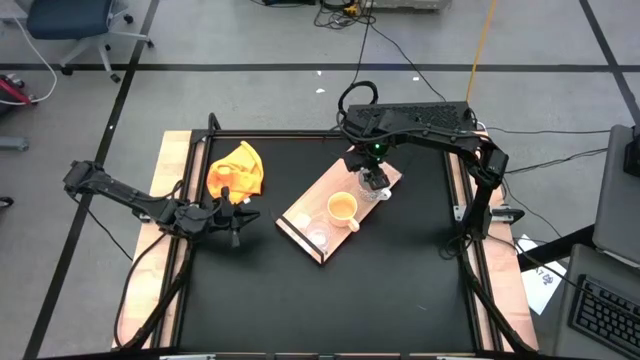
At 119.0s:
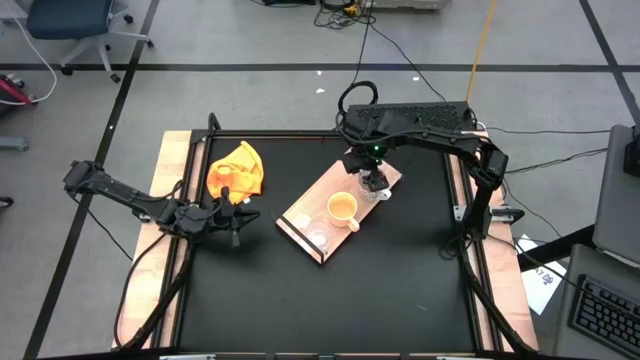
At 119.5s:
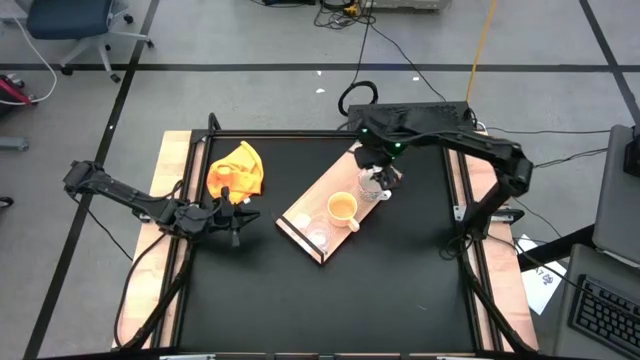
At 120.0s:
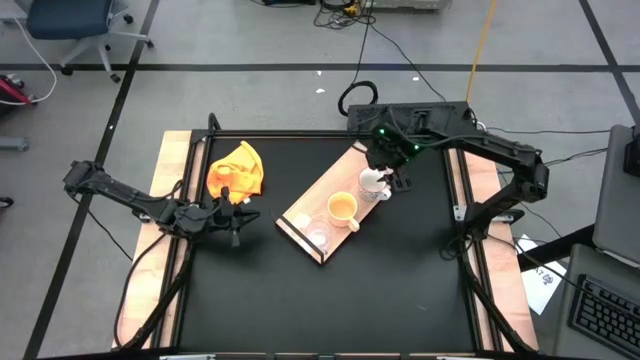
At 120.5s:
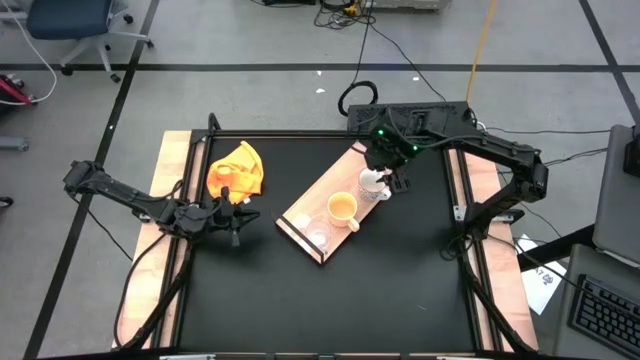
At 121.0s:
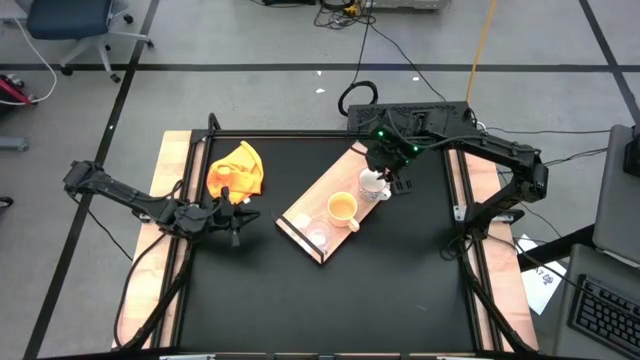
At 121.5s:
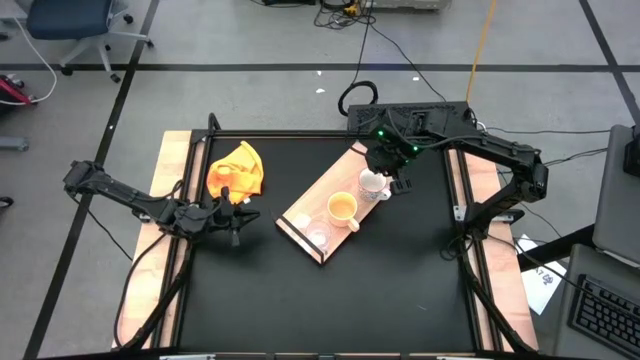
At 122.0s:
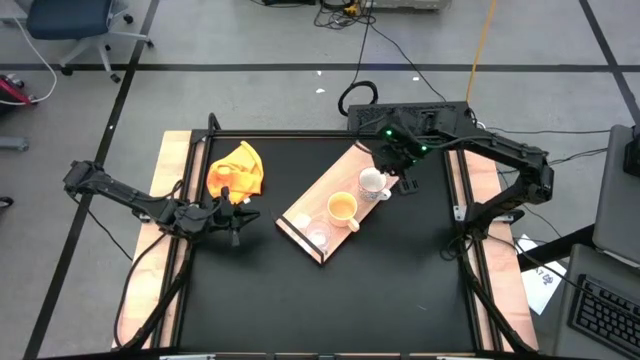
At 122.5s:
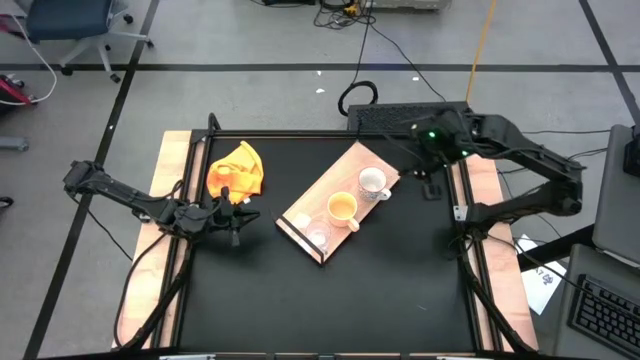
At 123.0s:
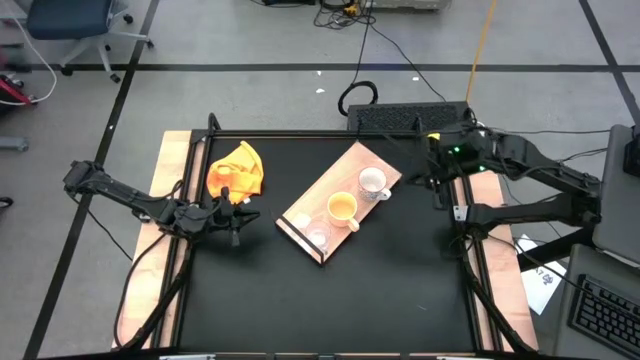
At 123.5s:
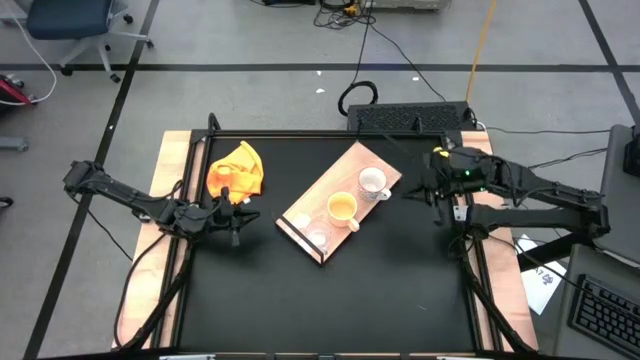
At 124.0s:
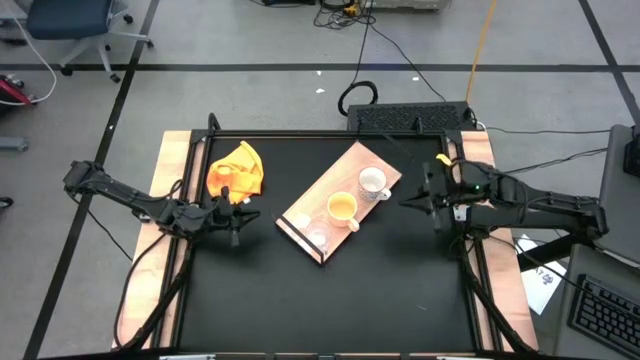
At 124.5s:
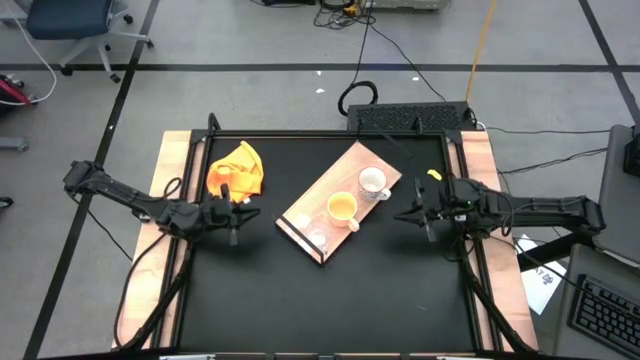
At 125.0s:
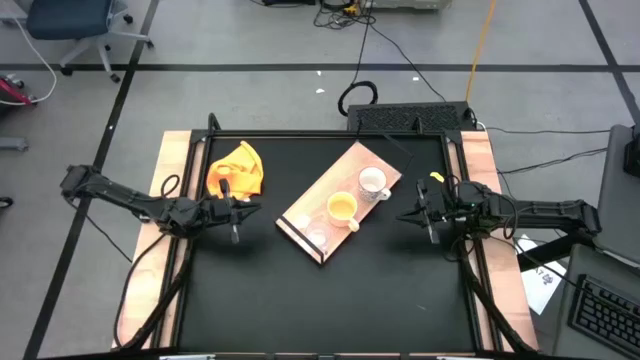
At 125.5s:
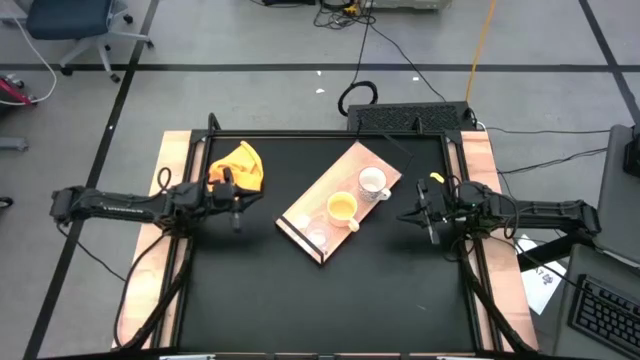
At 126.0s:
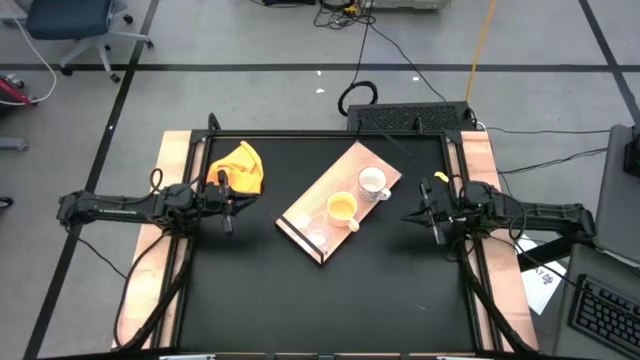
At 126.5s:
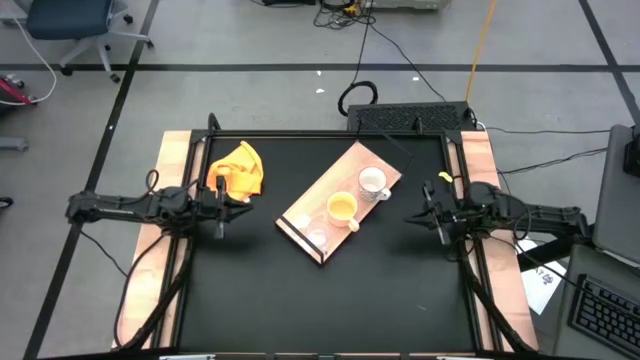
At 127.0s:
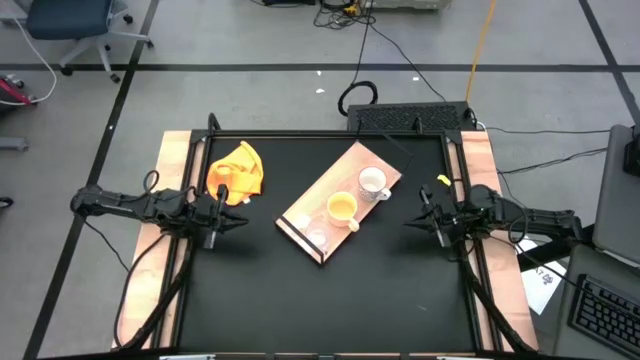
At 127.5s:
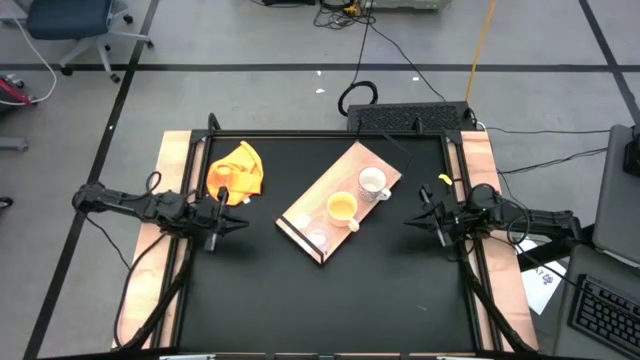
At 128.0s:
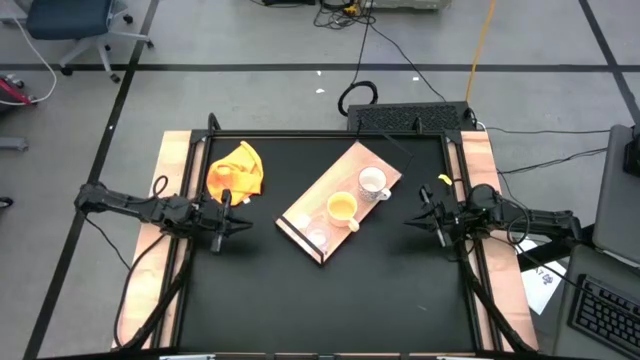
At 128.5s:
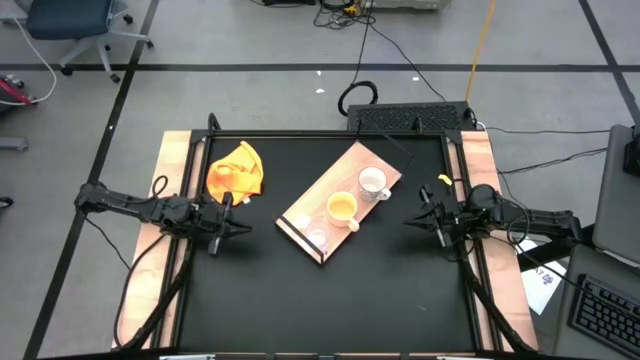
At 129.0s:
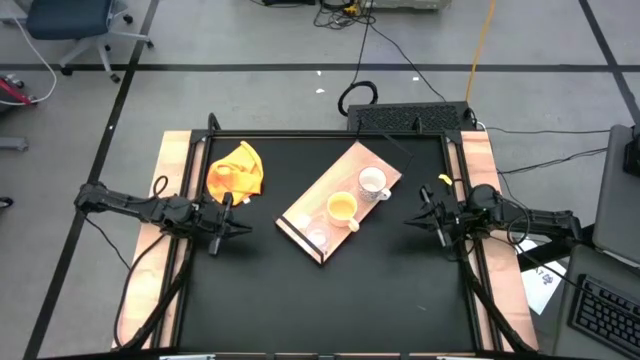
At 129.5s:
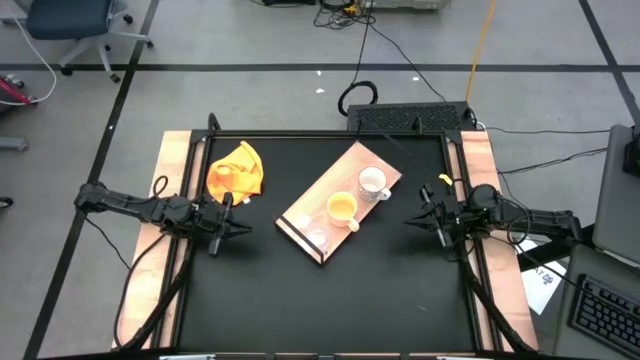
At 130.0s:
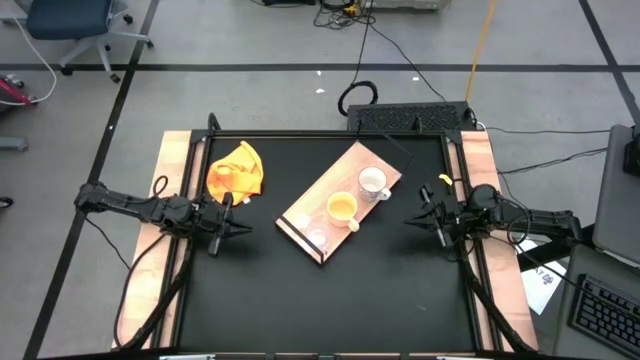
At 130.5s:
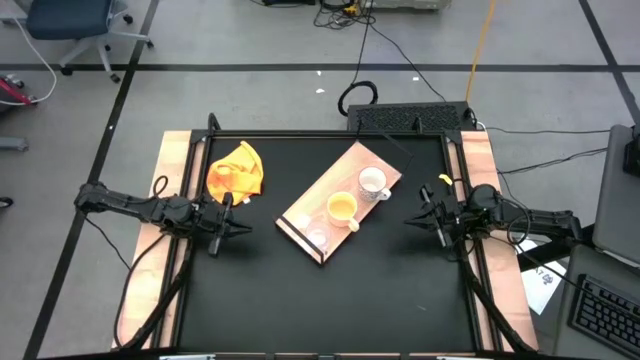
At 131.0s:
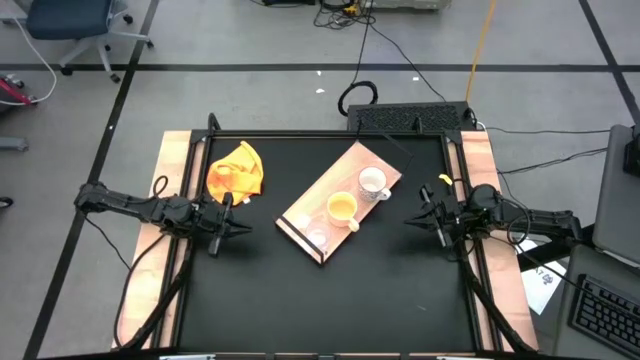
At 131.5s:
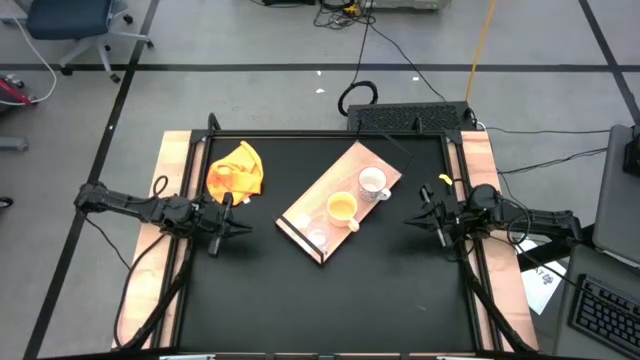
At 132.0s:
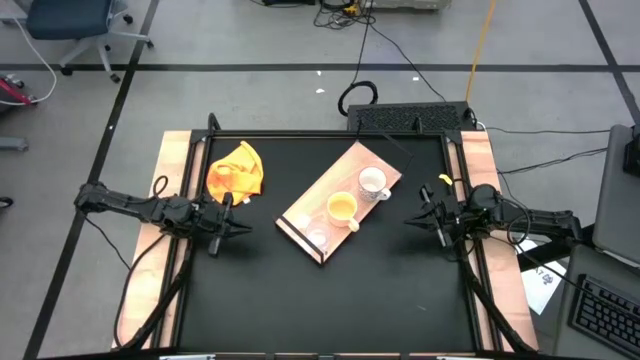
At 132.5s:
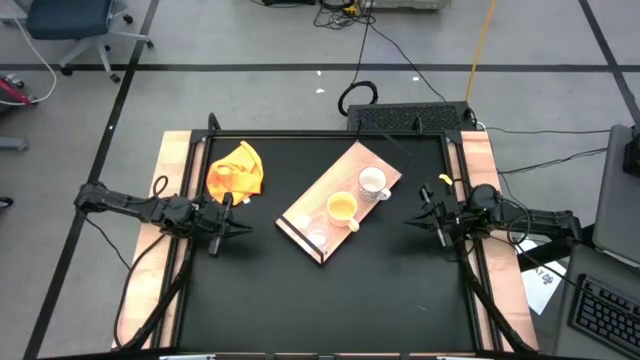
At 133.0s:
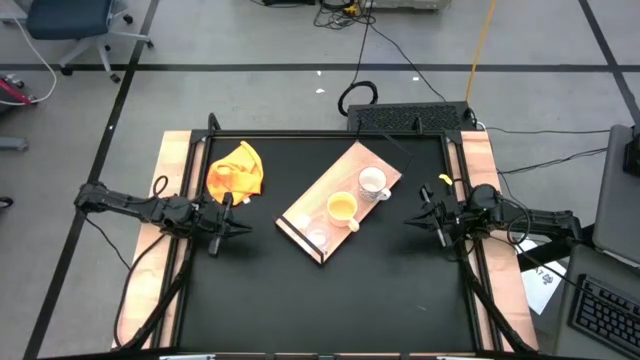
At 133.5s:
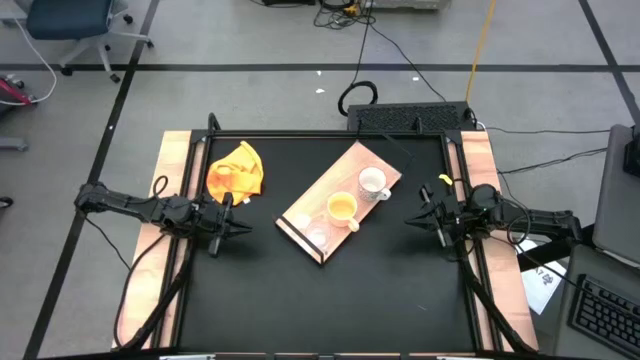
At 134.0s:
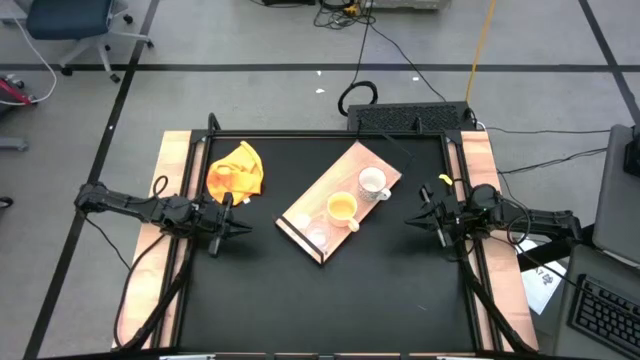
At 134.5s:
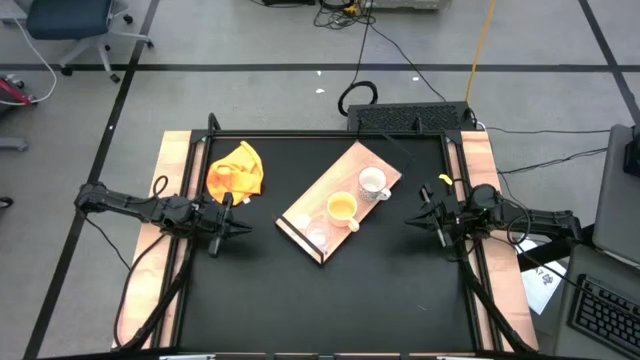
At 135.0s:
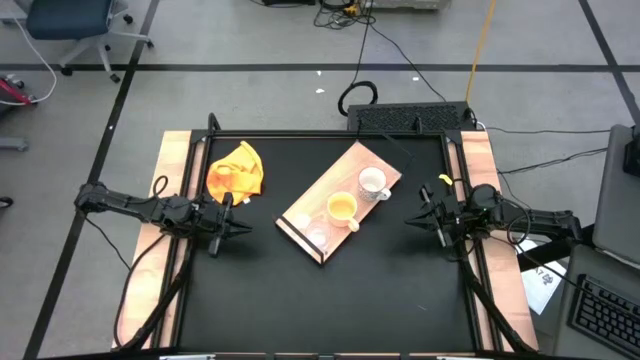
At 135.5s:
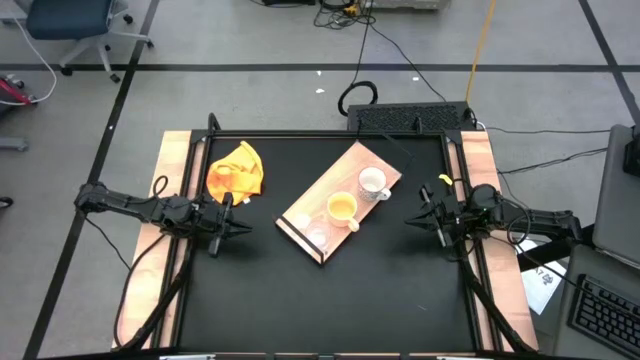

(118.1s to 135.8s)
Task: Stack small to large cups/mugs on shelf
Return to Home Position

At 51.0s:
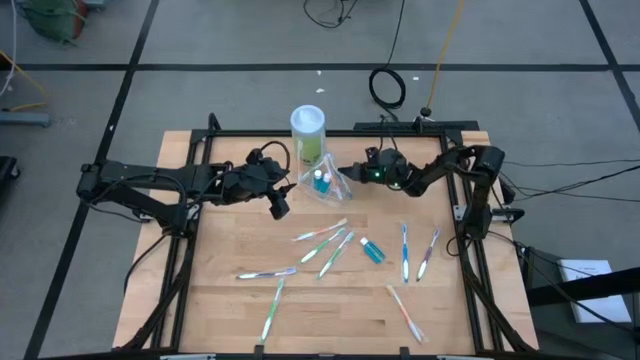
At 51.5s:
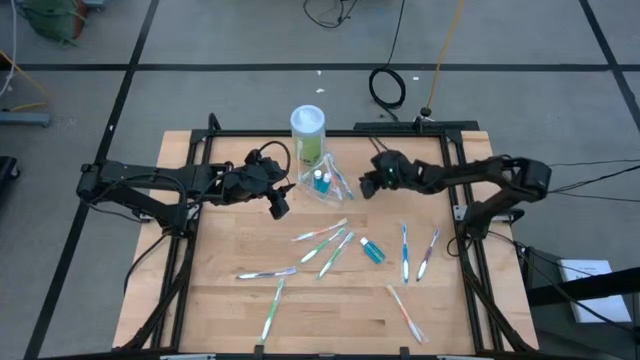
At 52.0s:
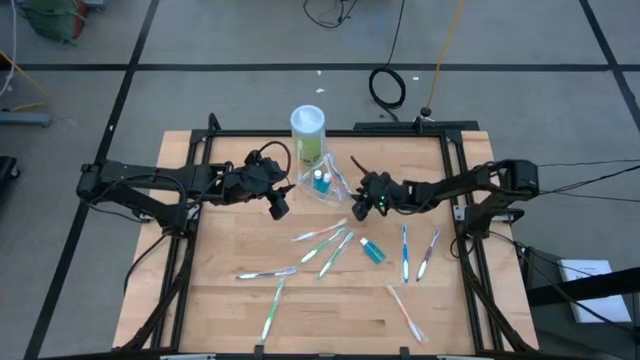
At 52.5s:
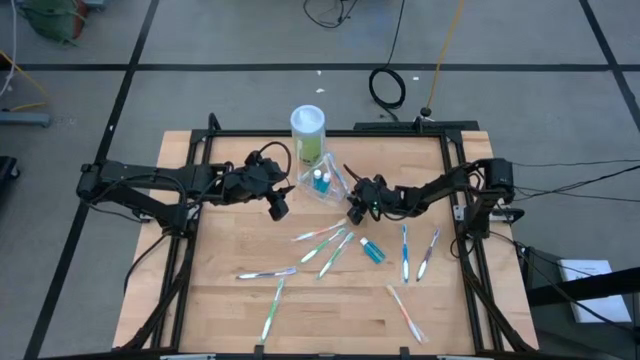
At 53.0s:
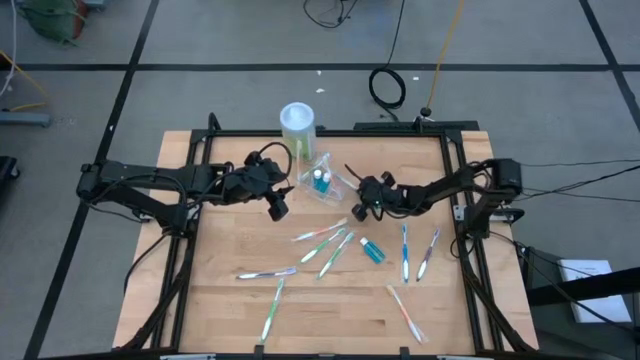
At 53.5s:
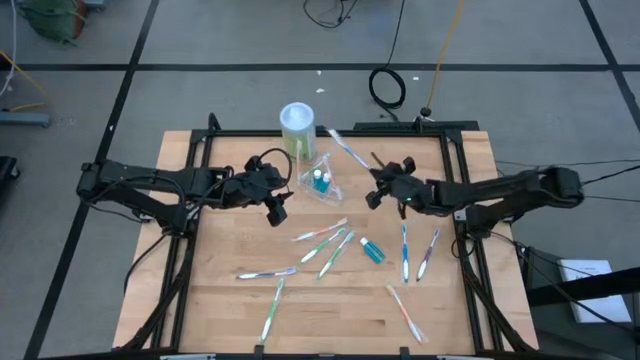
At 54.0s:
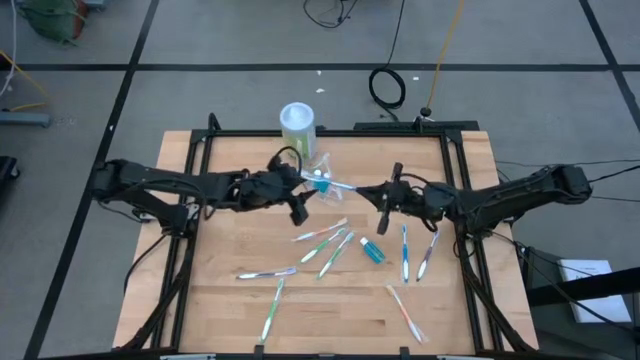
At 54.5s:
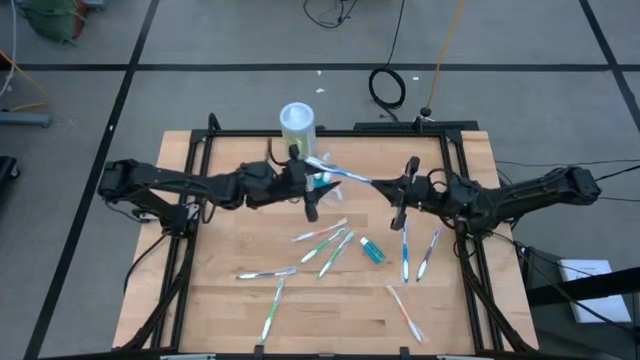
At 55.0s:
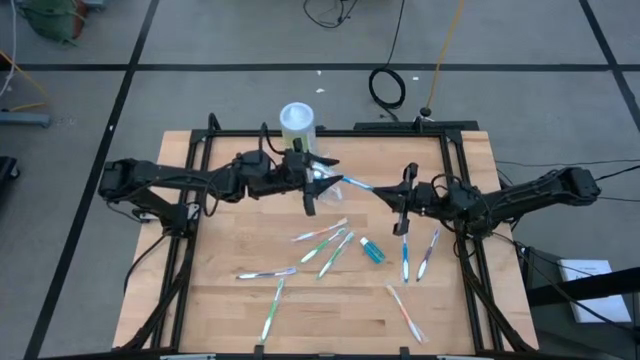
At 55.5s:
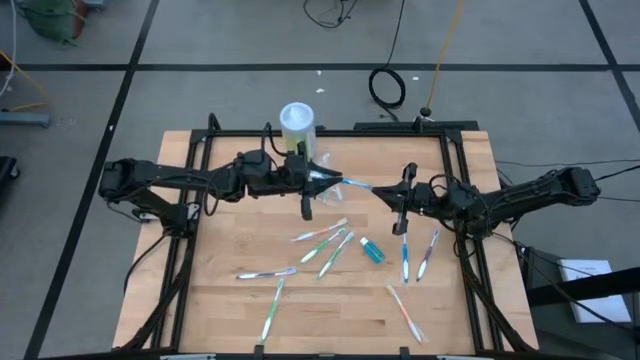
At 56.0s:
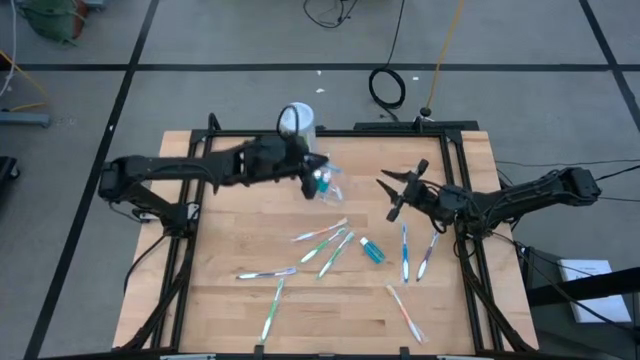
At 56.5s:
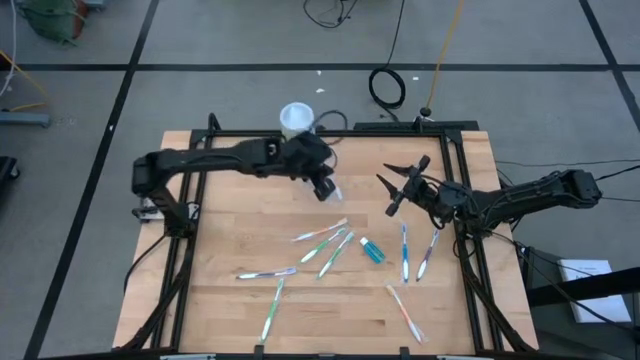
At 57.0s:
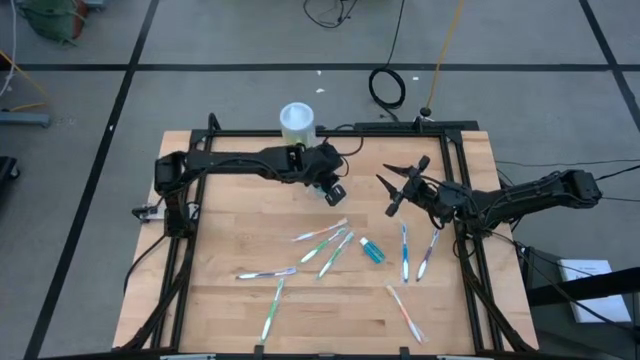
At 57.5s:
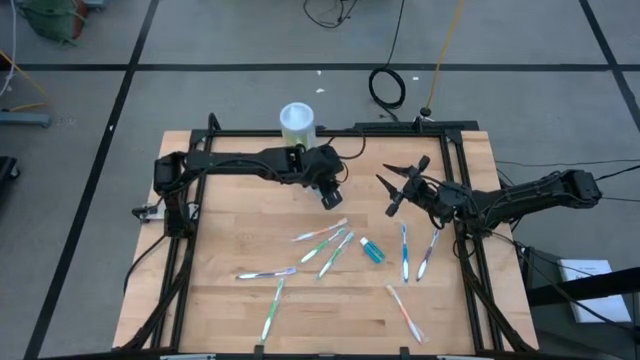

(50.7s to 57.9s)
Task: Pick & Place toothbrushing station
Put the blue toothbrush into the right of the transparent organizer
